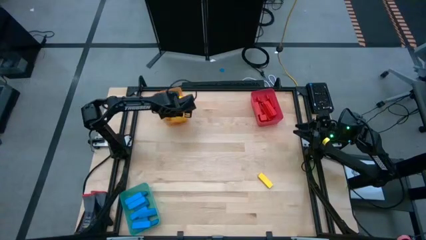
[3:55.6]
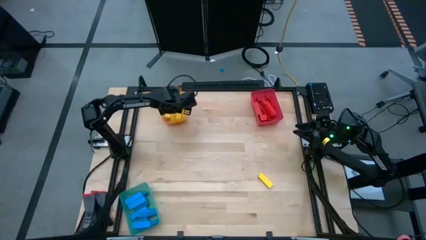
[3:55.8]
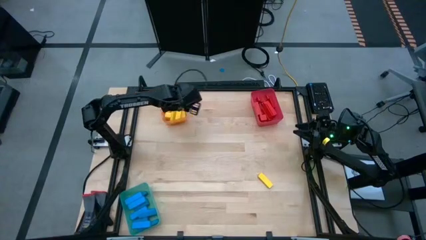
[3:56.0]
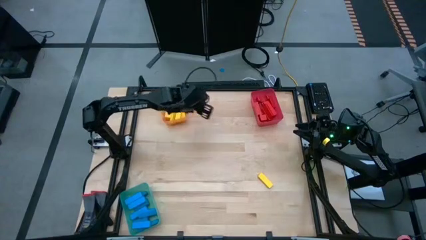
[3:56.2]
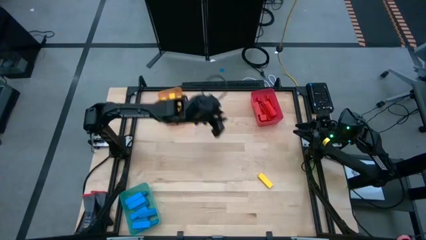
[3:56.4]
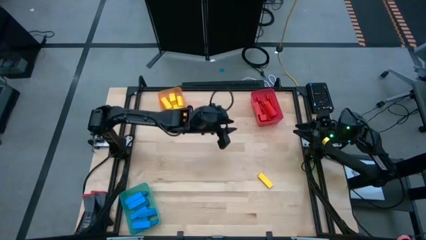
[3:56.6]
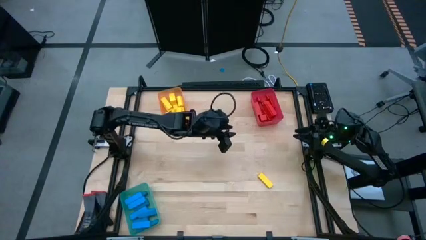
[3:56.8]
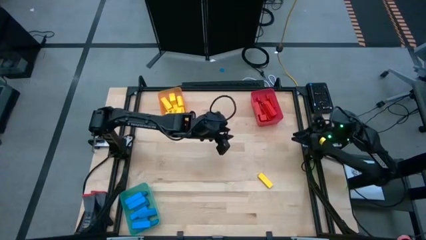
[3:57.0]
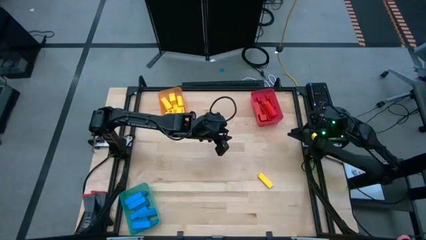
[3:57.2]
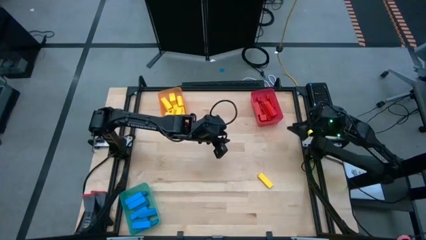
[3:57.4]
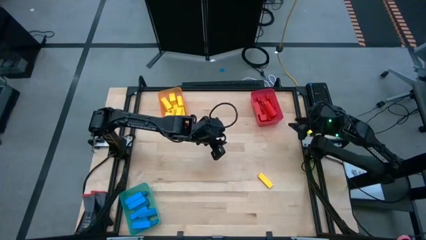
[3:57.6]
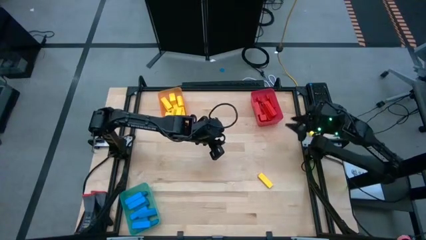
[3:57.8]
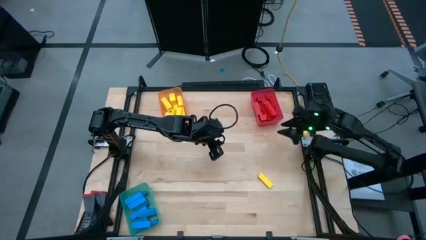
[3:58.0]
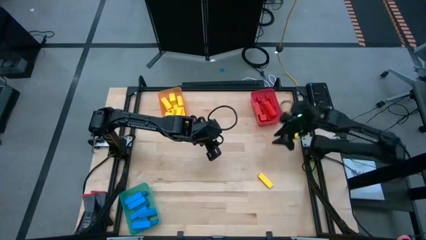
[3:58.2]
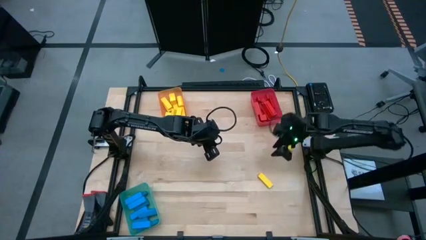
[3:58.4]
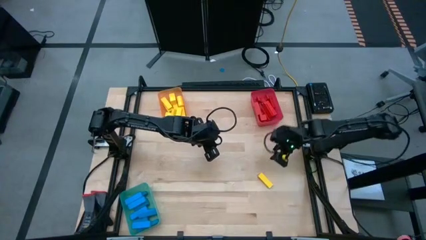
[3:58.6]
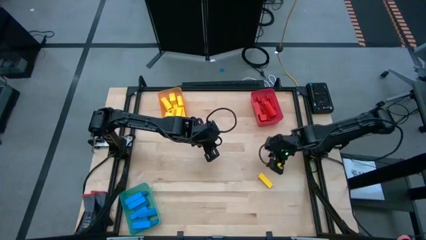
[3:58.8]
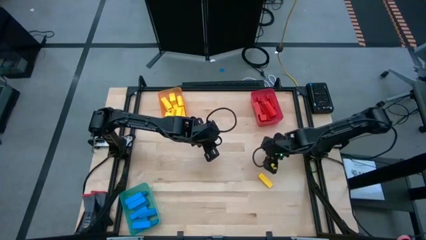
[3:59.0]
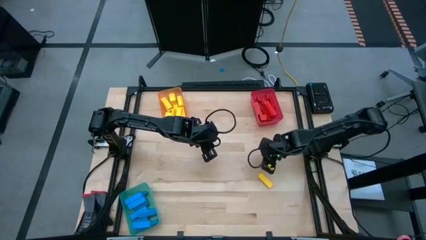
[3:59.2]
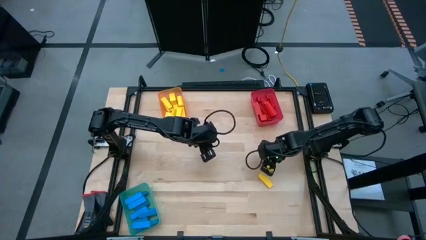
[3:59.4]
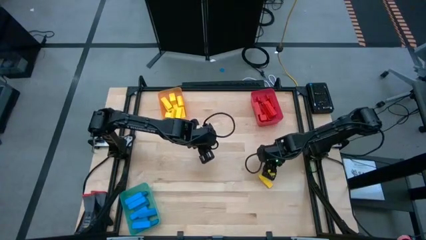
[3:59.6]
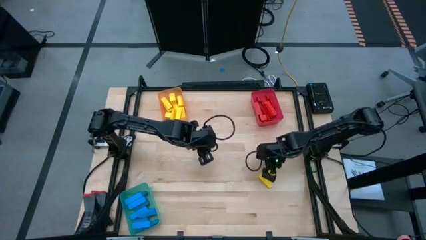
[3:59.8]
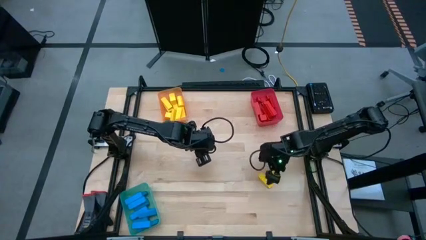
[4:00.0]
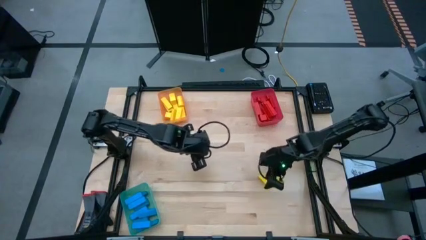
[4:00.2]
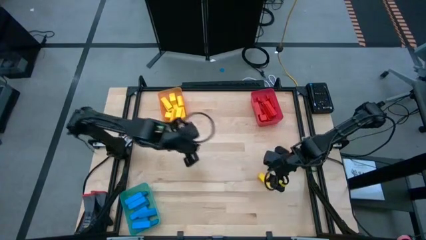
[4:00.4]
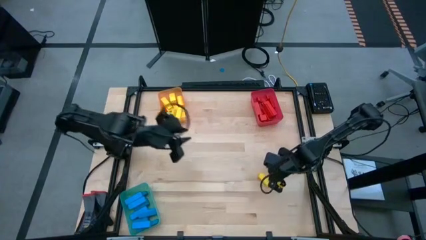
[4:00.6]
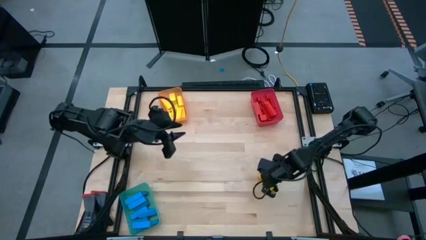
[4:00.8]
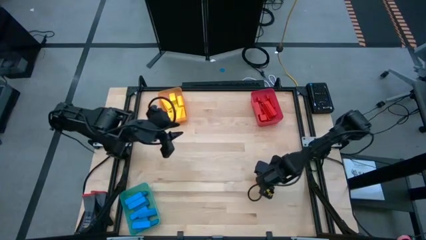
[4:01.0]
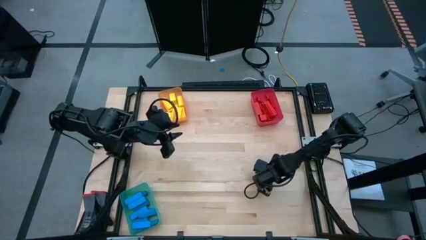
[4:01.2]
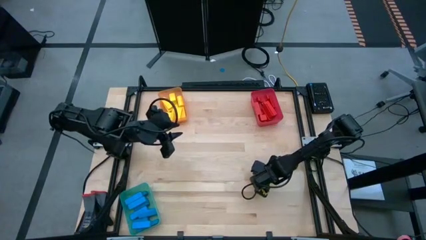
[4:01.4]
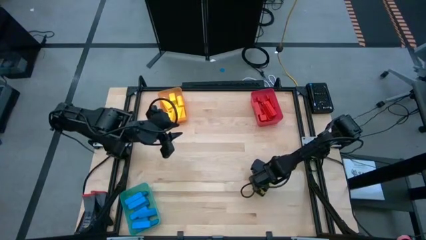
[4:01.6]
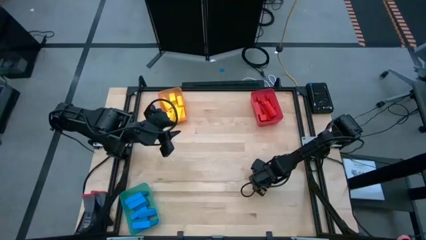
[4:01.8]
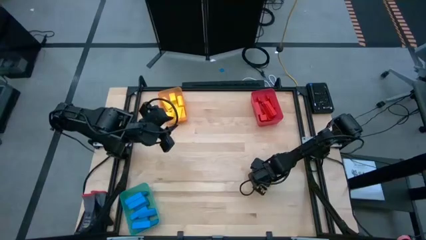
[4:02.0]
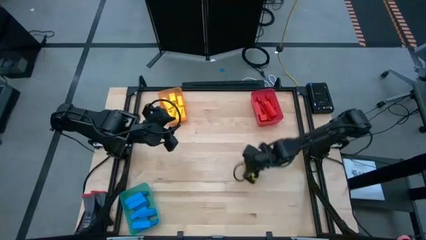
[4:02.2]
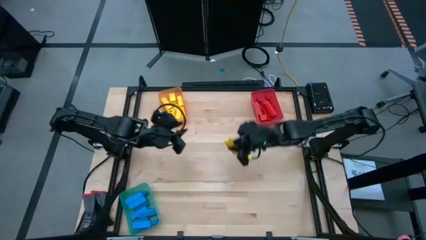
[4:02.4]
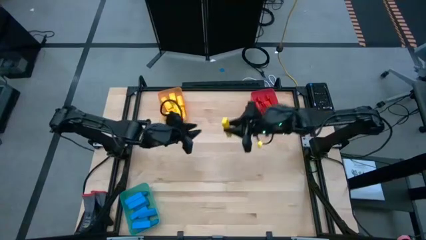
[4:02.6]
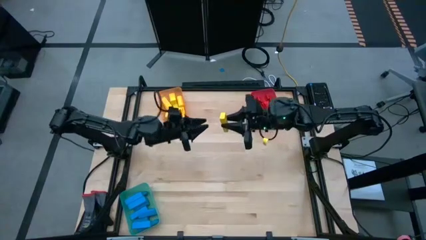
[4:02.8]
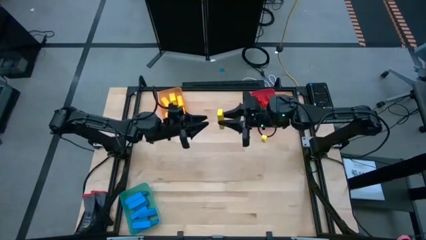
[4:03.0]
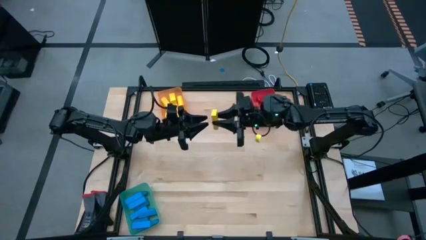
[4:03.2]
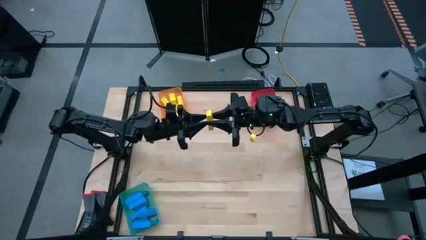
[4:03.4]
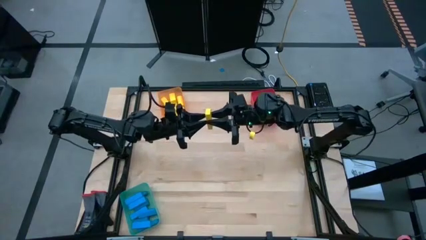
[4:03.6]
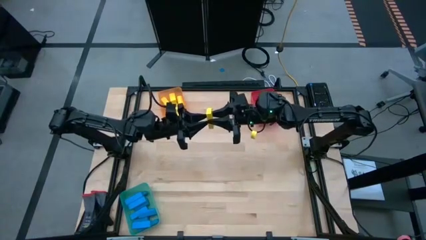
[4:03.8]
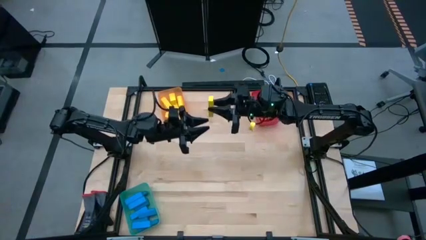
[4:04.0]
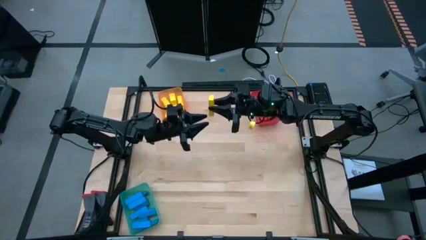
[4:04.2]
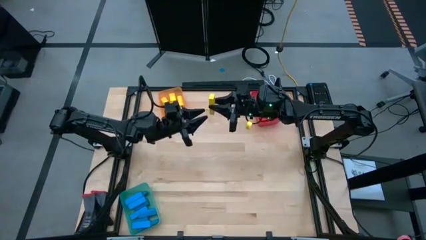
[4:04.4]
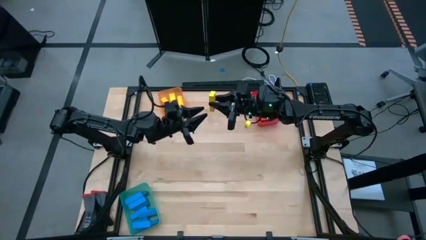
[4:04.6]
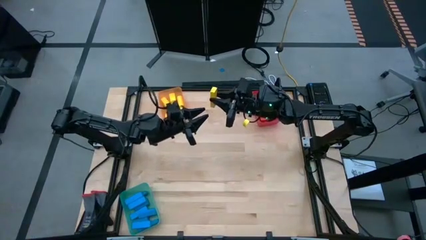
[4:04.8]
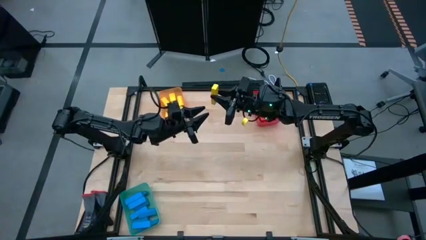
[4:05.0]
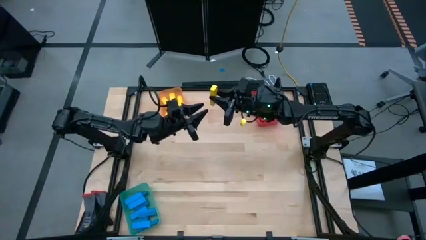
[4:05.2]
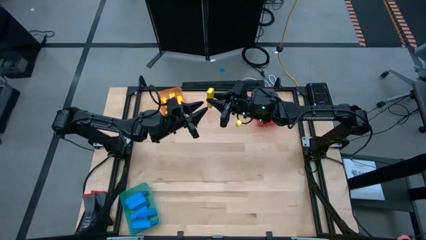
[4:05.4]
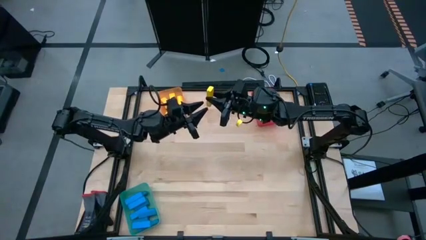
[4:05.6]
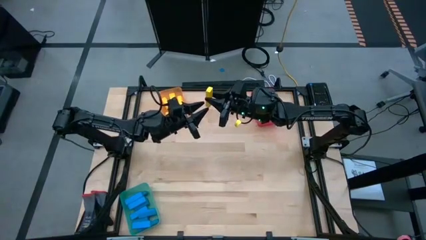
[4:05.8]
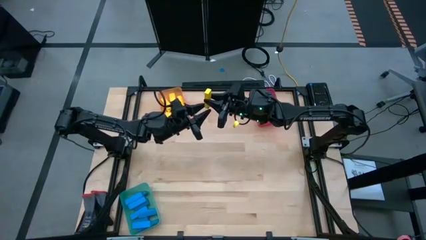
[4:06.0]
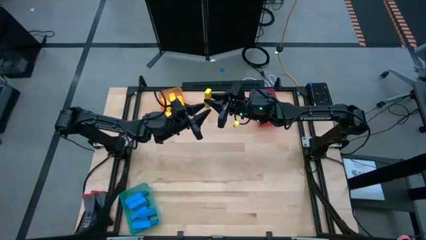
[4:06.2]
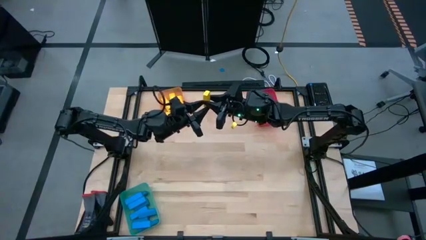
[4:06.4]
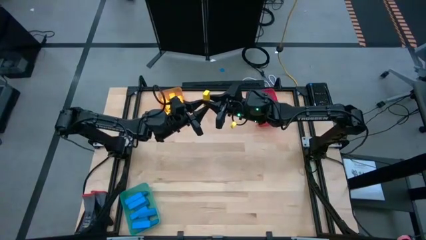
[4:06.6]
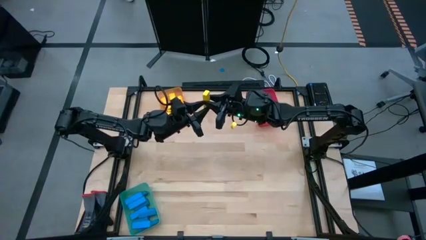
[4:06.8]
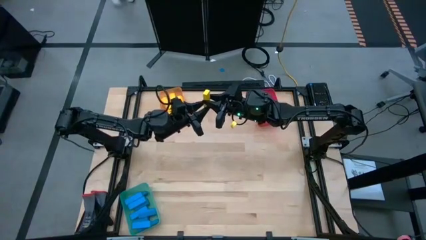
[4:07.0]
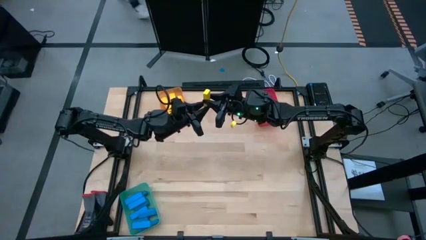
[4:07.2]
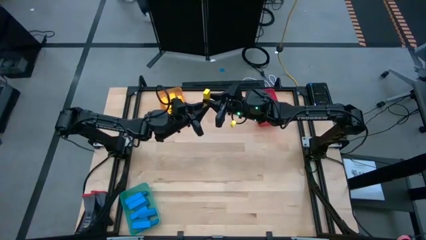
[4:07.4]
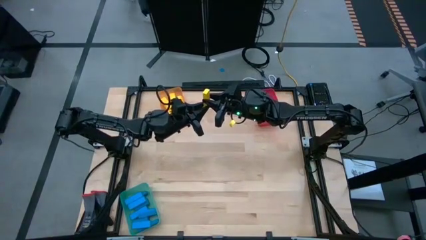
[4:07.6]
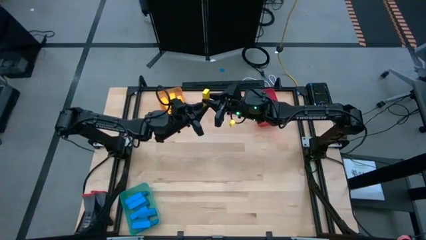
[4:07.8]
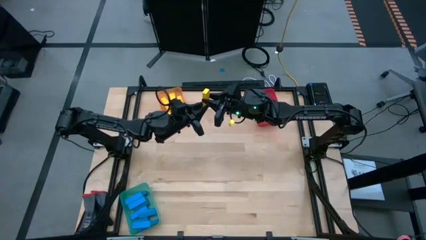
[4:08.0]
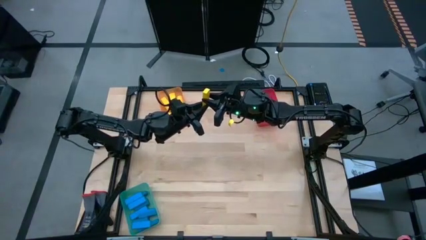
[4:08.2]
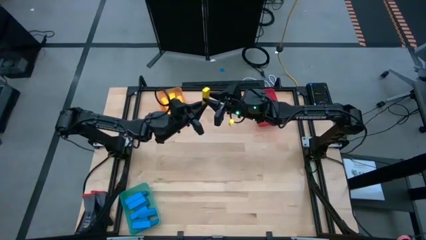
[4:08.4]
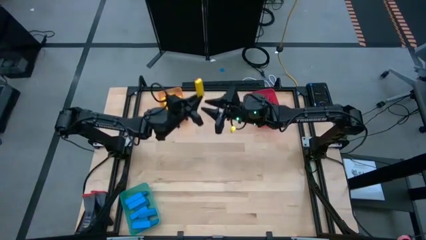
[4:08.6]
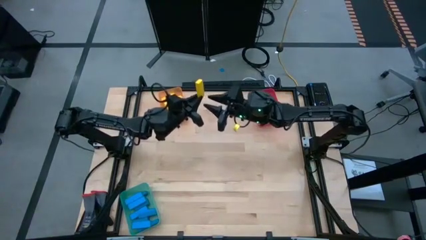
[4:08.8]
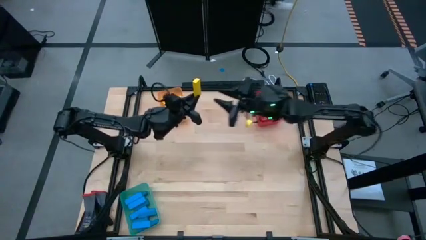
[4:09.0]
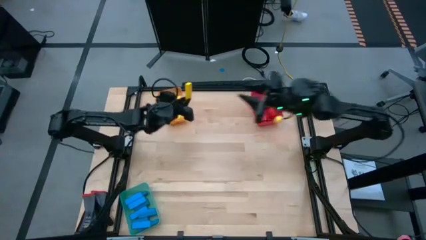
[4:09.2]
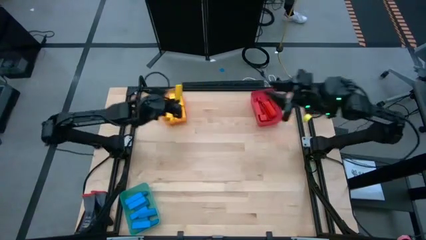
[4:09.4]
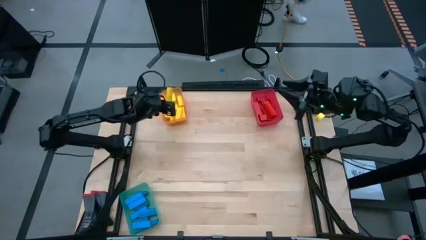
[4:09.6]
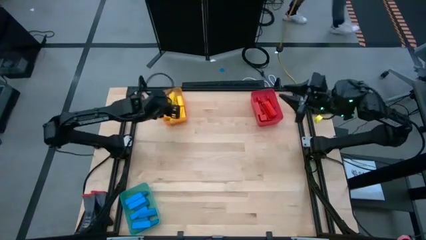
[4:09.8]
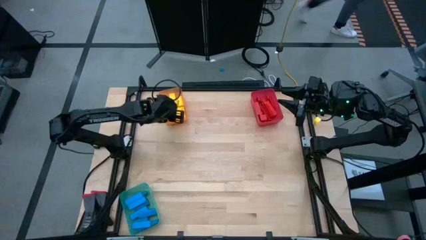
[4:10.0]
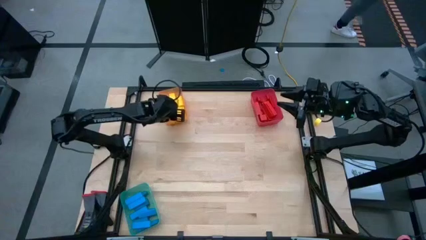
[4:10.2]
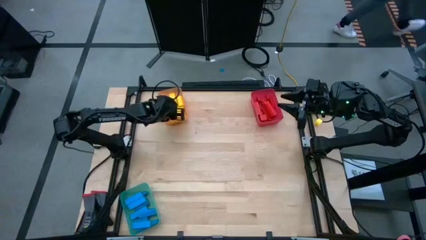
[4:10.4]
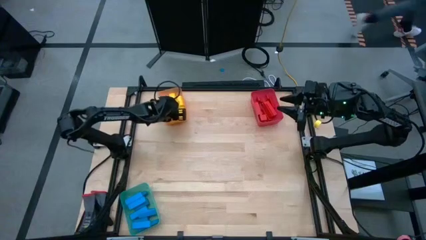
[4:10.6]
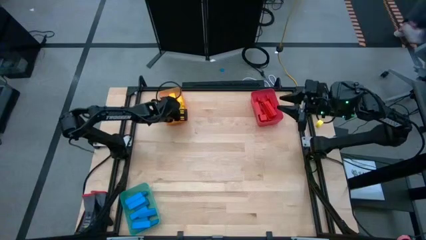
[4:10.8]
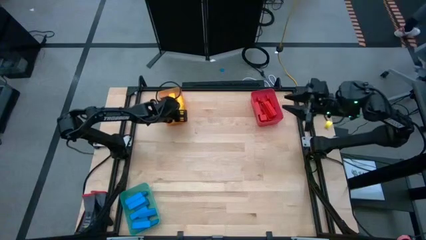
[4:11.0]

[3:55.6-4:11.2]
Task: Sort blocks
Put the yellow block into the orange transparent bin
